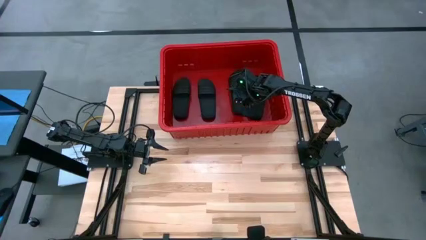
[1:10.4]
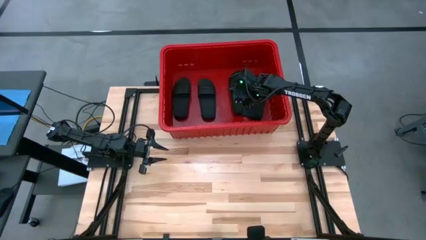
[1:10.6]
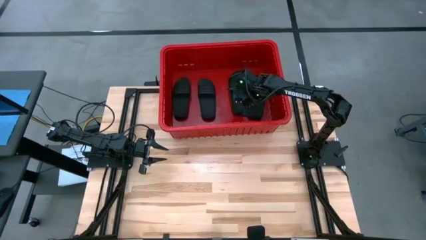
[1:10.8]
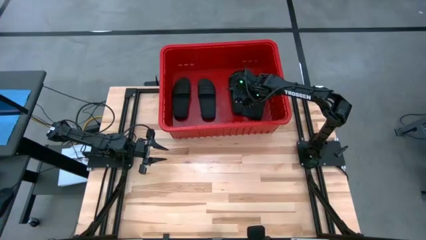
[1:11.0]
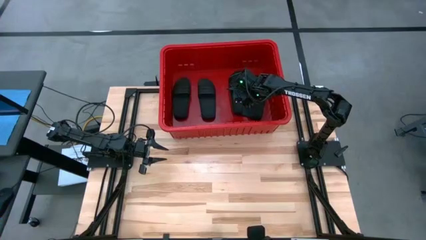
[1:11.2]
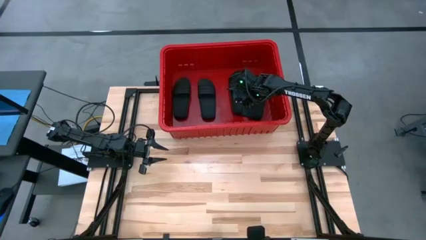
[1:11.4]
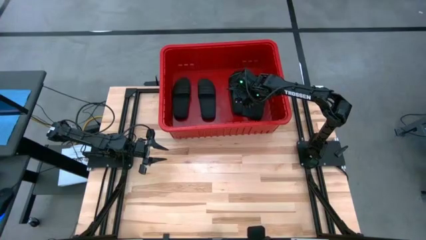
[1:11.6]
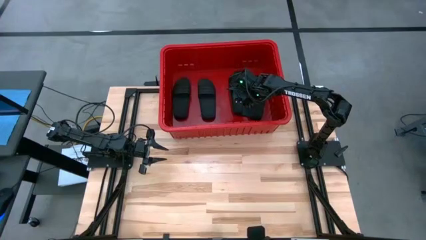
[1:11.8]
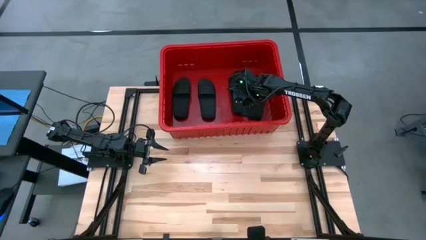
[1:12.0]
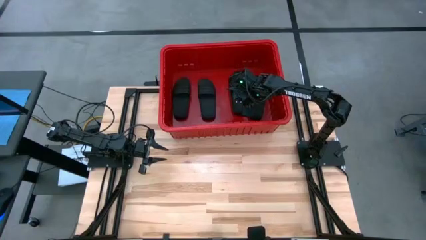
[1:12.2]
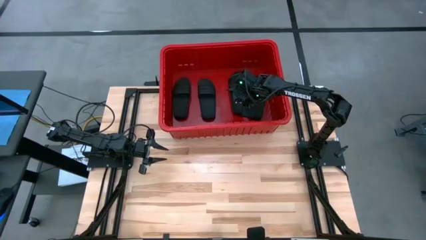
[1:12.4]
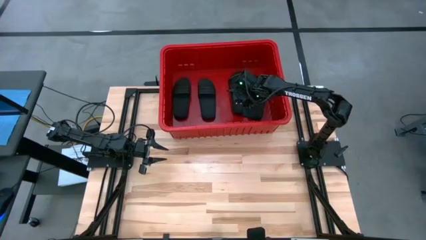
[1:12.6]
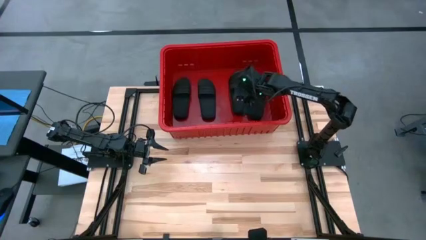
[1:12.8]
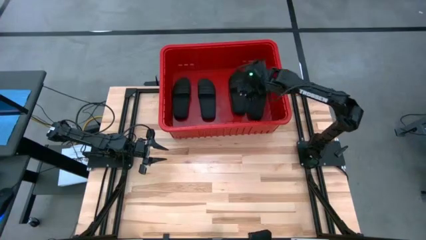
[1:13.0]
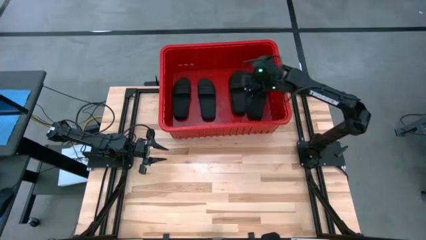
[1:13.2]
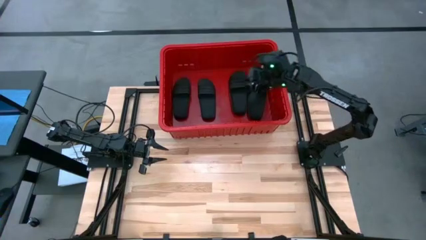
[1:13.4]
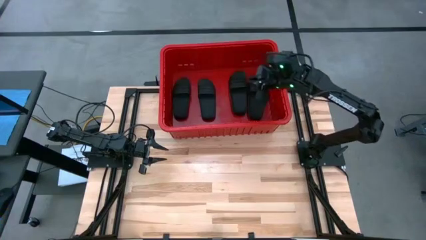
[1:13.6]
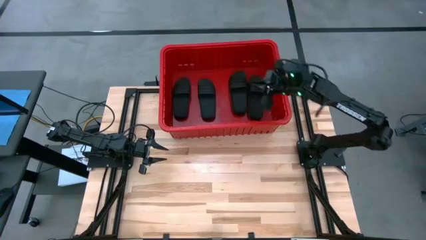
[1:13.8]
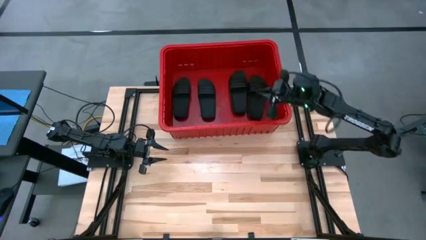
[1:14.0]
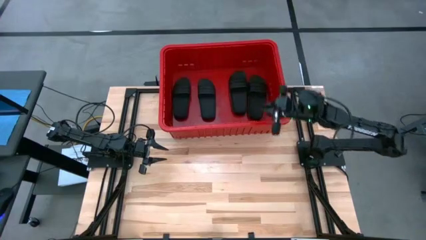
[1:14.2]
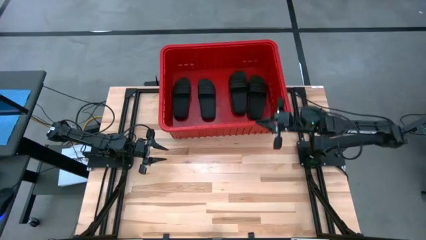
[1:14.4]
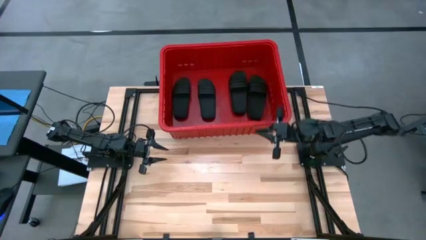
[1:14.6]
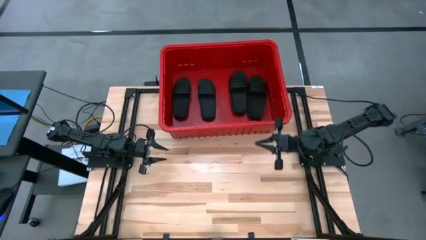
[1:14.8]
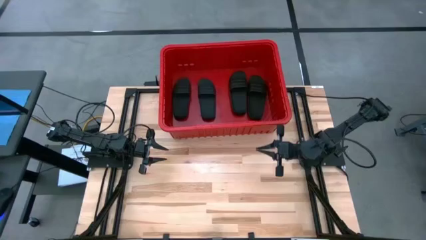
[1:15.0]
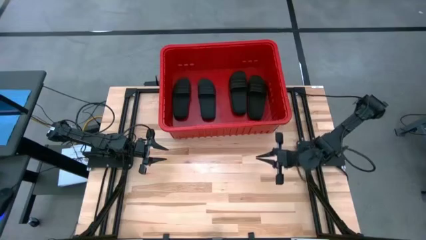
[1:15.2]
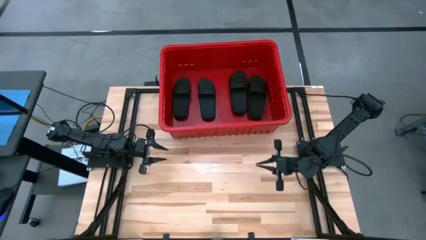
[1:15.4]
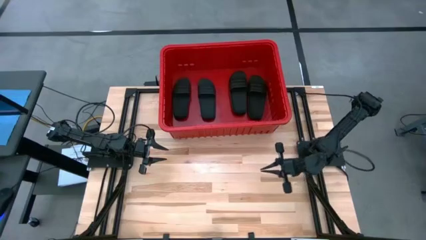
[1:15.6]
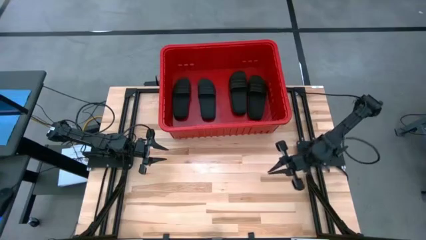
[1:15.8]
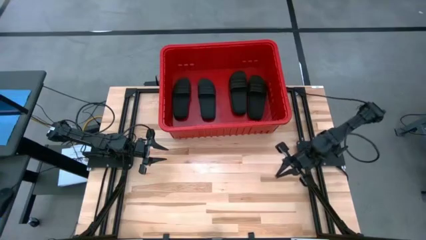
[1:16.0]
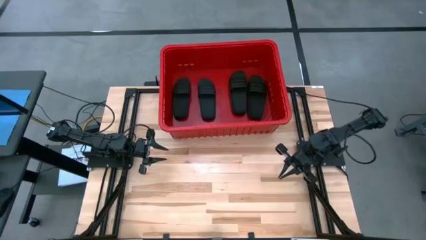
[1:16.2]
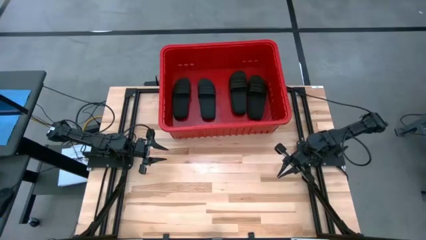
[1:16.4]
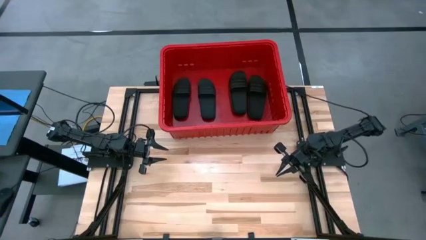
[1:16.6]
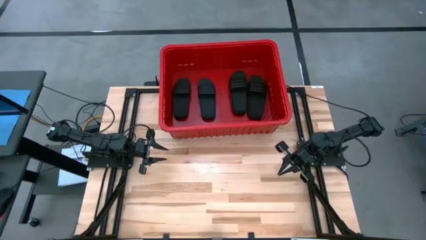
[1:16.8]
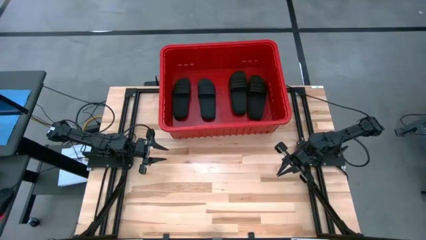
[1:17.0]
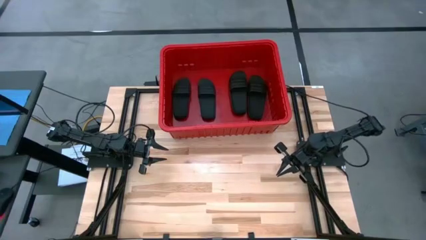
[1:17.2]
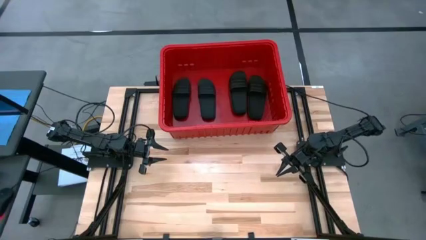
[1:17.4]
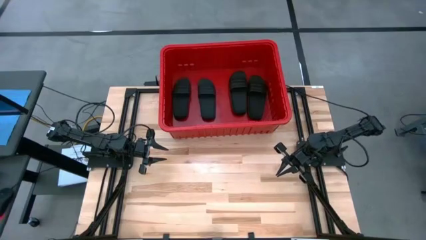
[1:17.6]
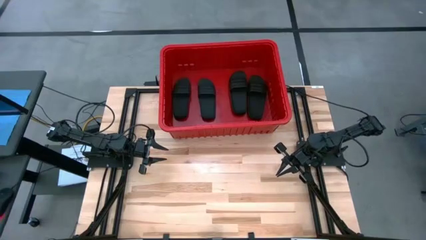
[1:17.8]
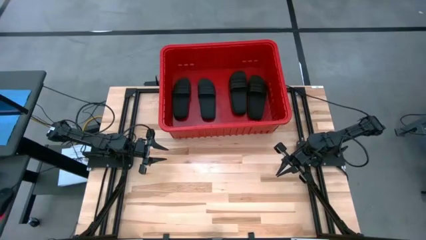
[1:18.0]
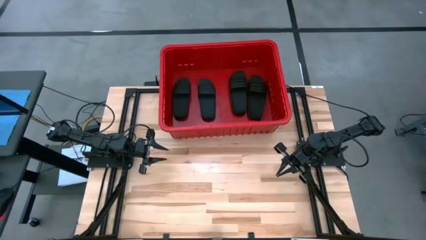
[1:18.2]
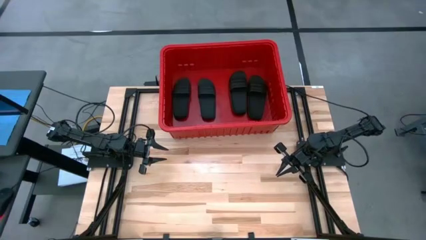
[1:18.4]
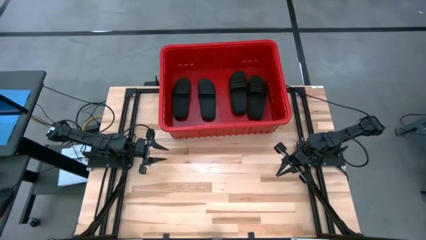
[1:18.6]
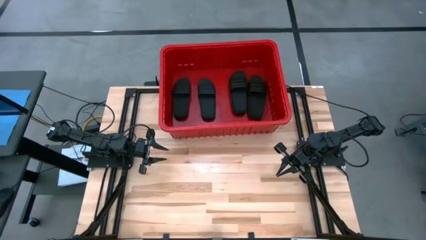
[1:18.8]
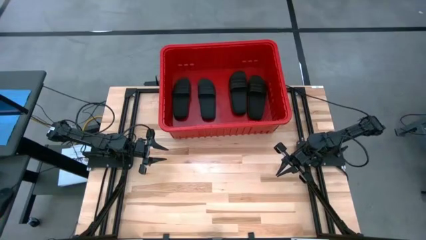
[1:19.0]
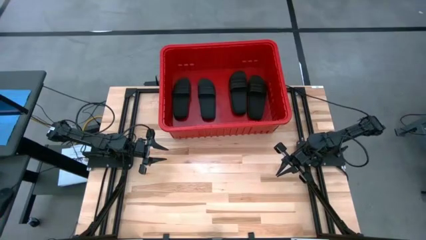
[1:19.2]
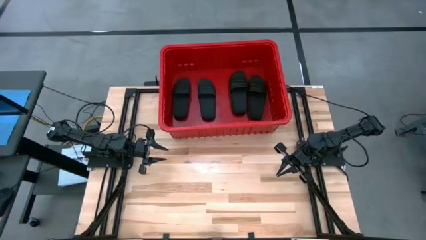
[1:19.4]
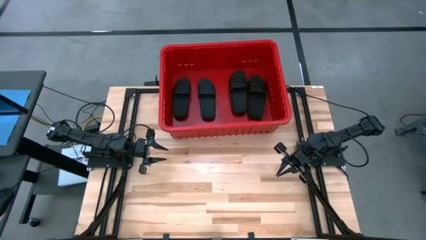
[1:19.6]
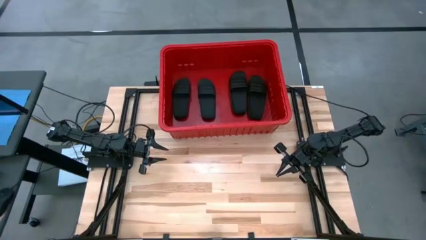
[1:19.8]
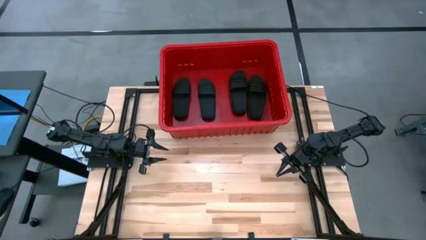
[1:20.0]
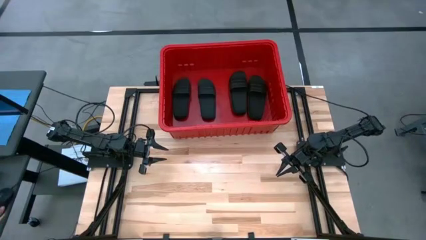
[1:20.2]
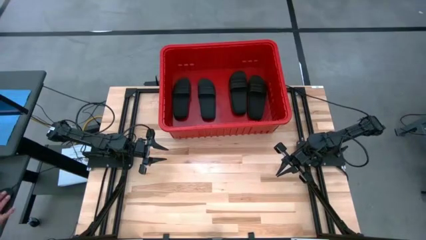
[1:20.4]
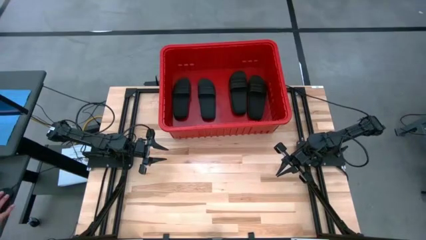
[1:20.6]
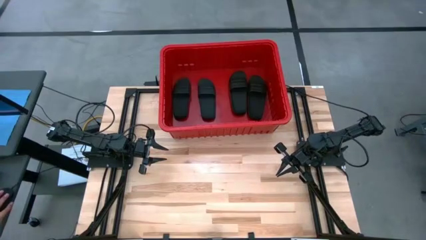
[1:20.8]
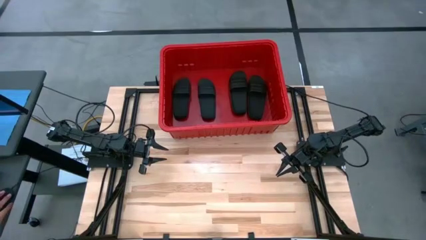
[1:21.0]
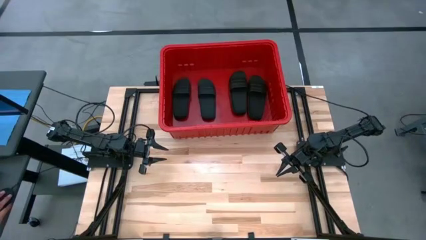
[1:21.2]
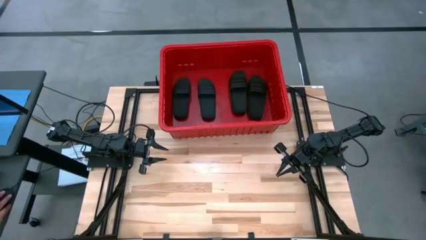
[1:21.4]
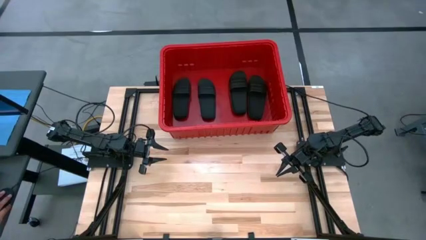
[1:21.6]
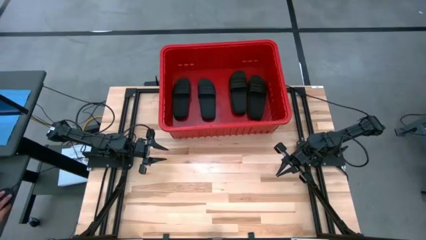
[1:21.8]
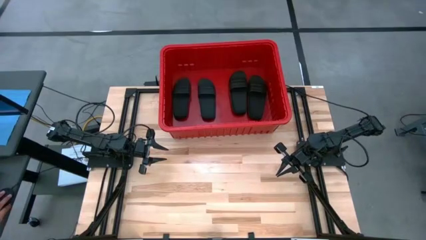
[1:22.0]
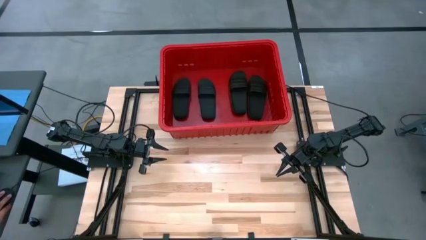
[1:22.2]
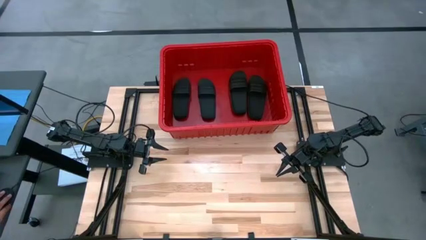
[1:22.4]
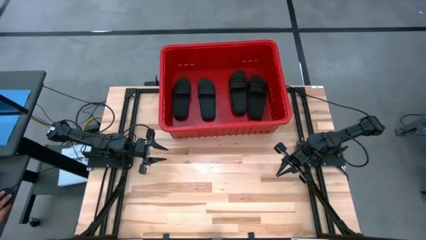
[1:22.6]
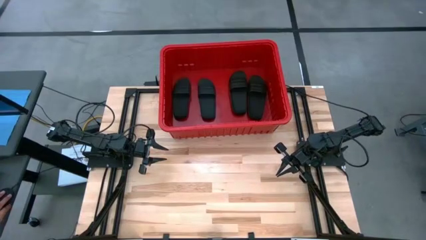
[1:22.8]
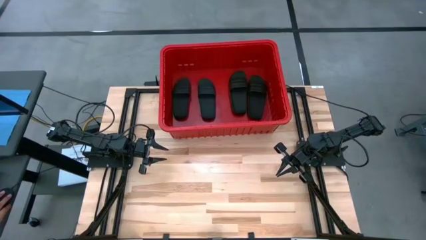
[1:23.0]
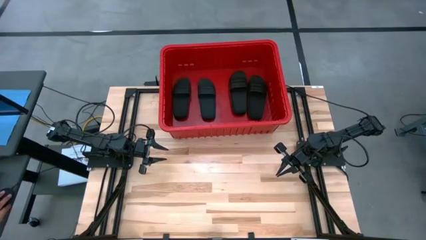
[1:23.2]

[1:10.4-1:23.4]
Task: Pick and place slides into bin
Return to Home Position
